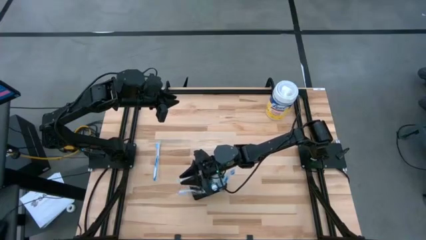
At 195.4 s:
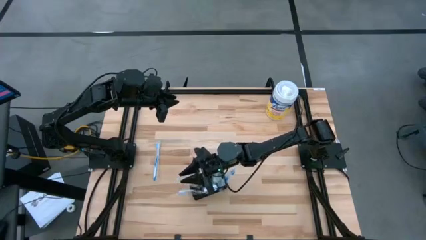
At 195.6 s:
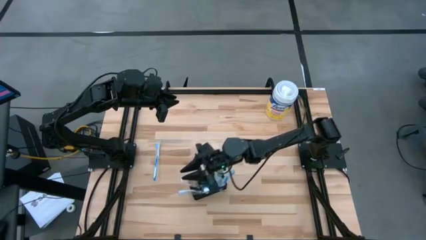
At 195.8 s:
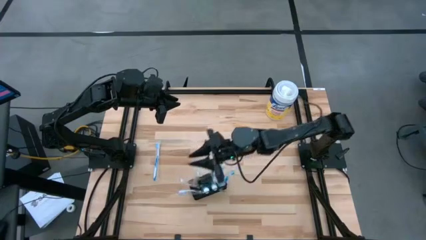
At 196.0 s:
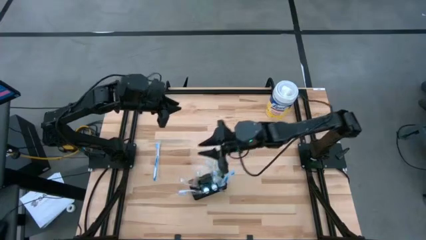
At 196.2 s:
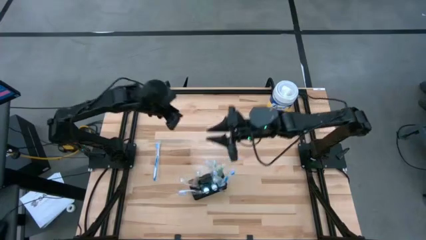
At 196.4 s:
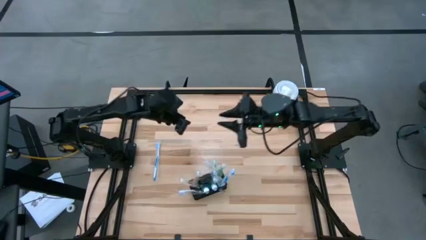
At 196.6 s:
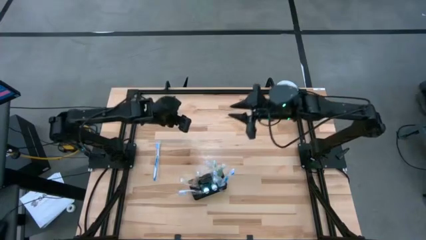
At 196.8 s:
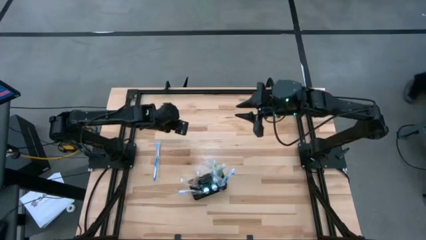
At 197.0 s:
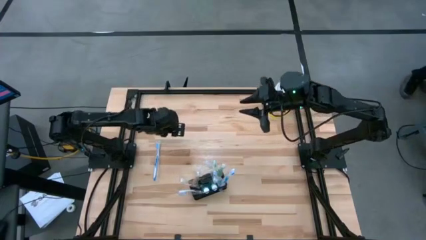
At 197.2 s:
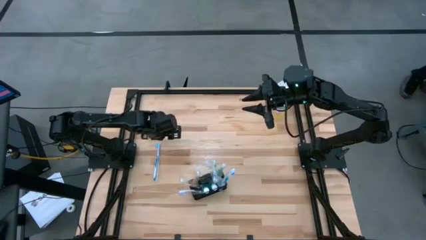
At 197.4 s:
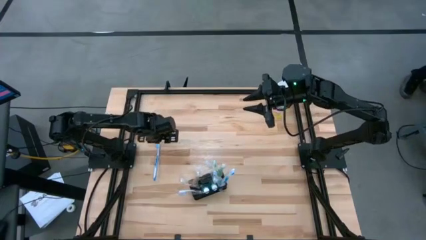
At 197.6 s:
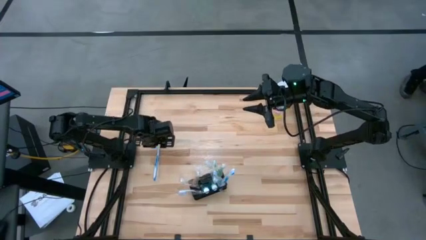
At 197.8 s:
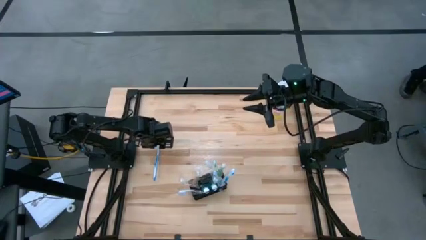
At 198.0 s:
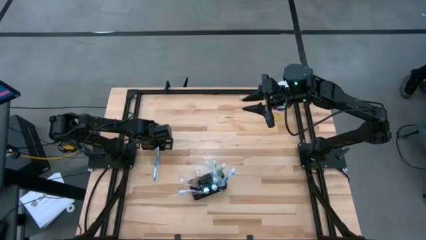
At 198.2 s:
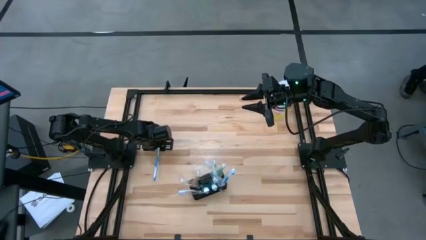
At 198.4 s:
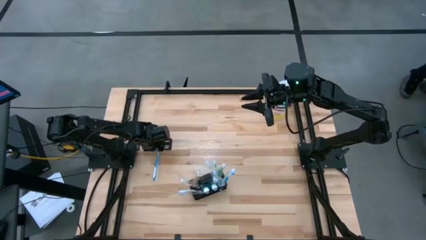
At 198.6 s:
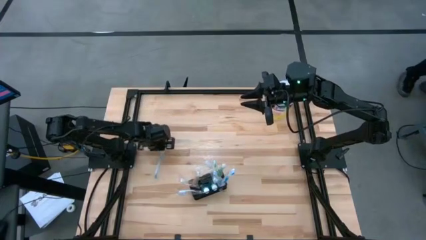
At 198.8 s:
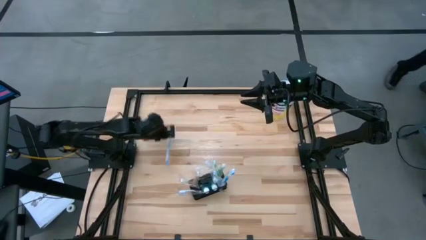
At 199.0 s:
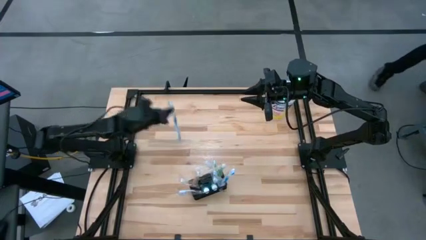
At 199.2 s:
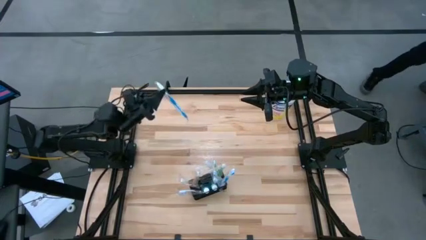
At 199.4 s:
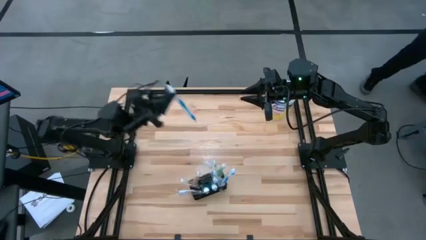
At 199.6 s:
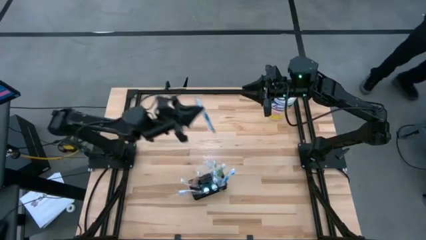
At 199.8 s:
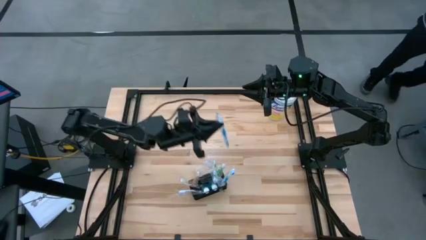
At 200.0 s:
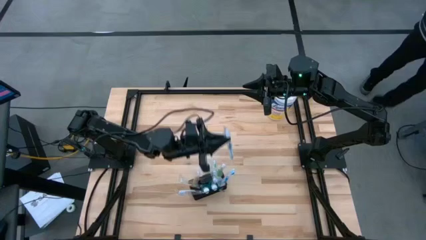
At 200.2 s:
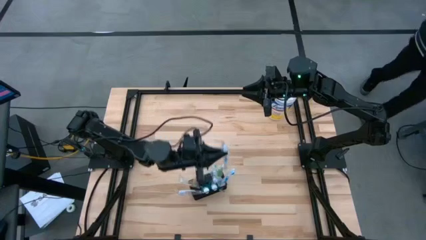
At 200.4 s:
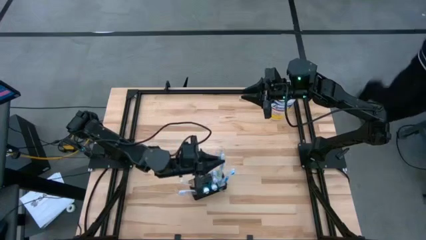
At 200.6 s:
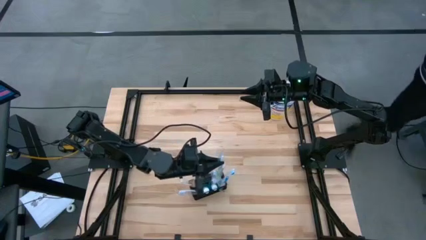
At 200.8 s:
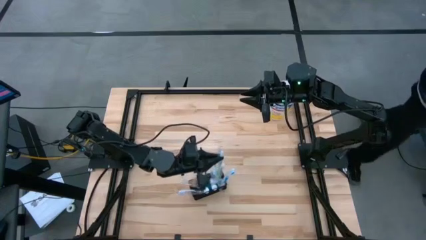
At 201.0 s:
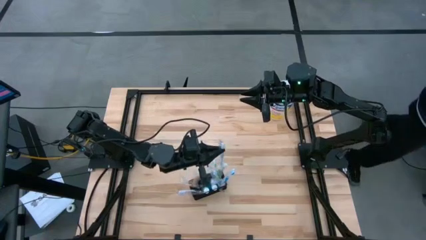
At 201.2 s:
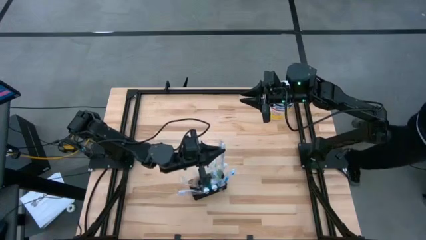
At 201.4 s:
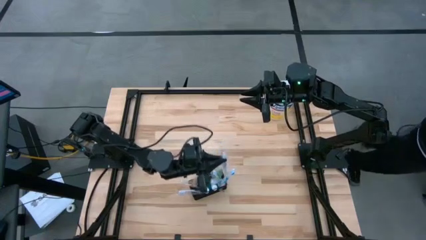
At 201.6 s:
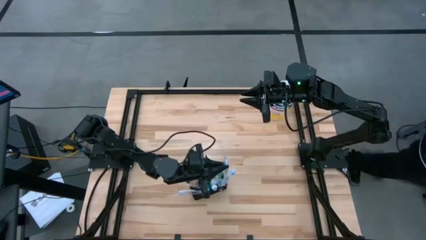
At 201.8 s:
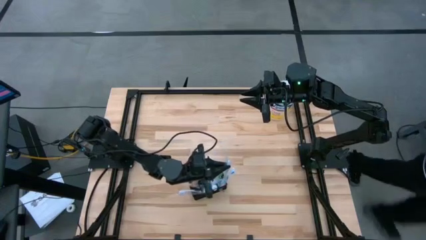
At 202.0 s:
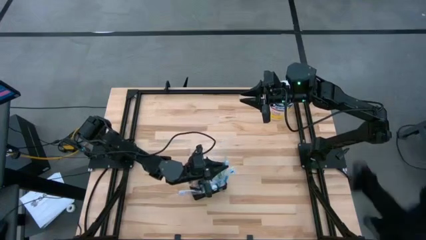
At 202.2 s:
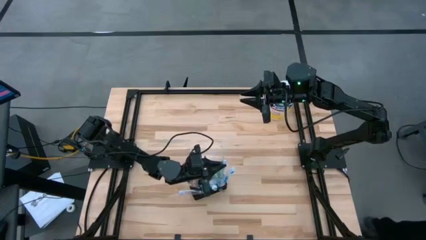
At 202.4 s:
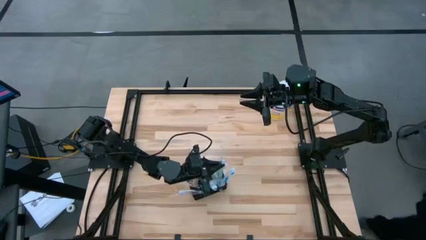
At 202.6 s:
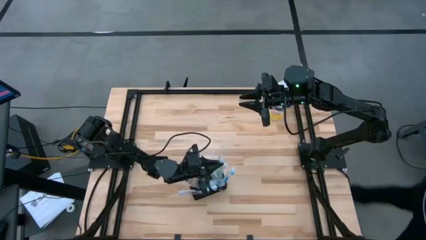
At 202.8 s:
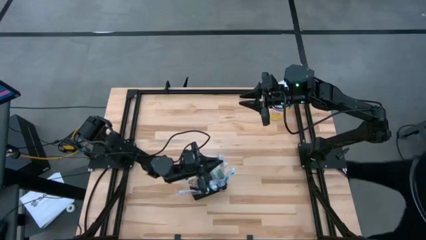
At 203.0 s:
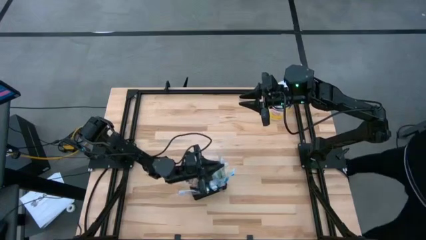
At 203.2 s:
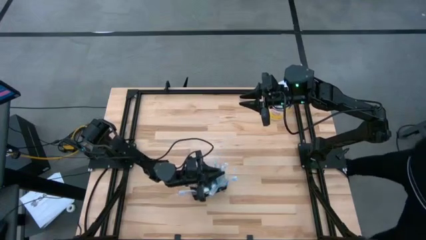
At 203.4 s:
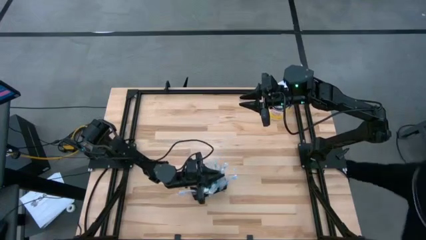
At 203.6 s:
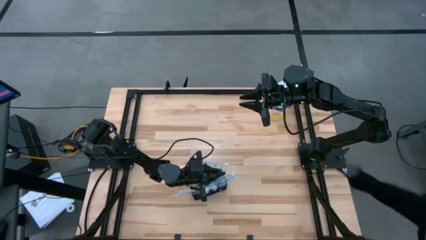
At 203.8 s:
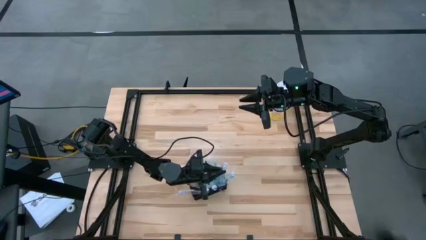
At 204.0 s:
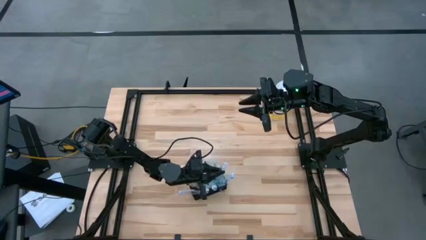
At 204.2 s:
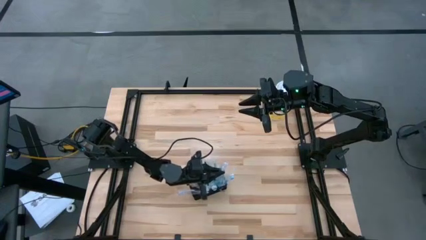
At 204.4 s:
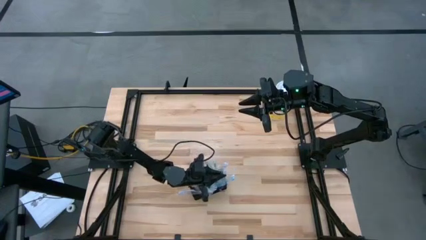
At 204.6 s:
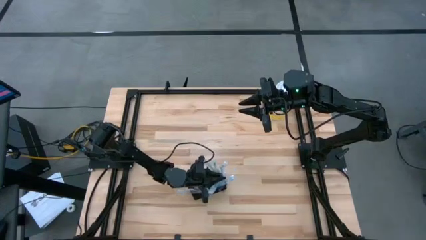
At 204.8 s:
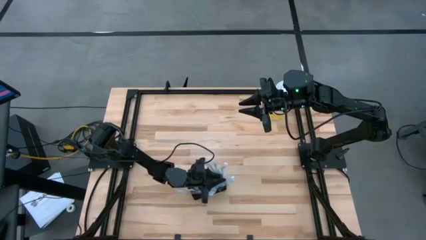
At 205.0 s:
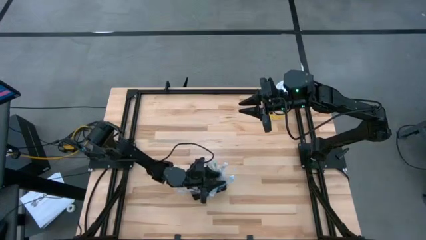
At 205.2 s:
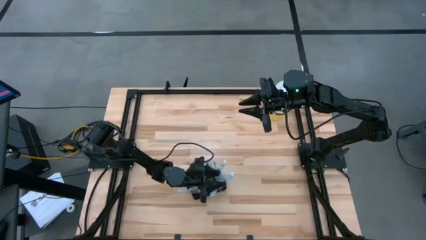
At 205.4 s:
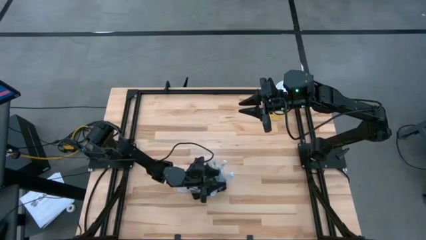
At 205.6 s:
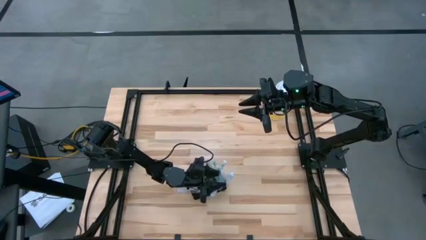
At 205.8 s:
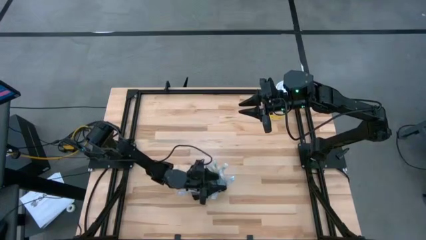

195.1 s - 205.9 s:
Task: Pick & Place toothbrushing station
Put the blue toothbrush into the mesh organizer

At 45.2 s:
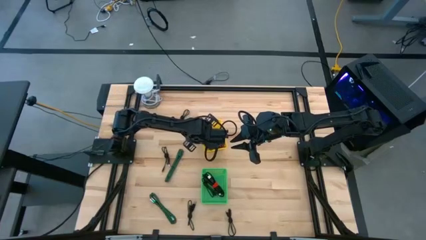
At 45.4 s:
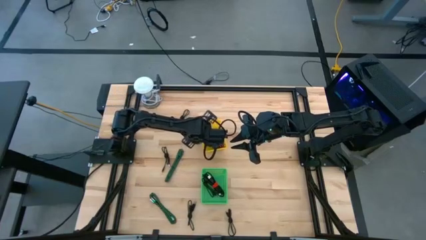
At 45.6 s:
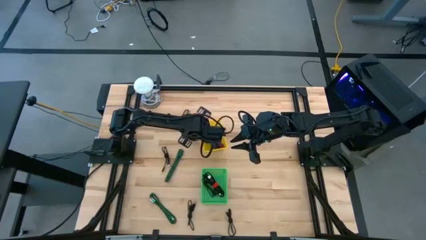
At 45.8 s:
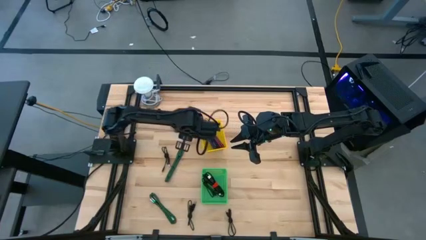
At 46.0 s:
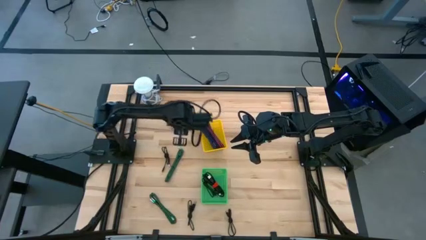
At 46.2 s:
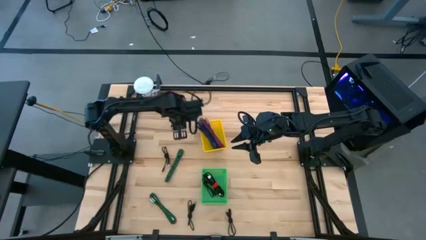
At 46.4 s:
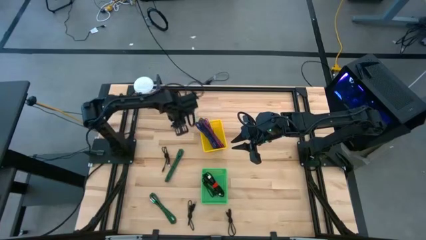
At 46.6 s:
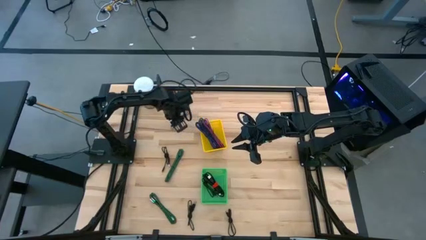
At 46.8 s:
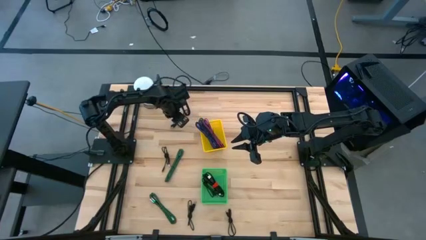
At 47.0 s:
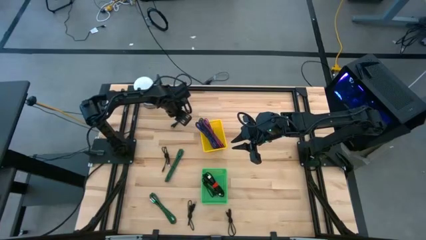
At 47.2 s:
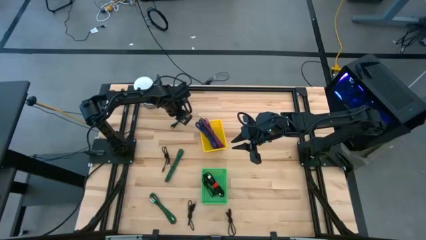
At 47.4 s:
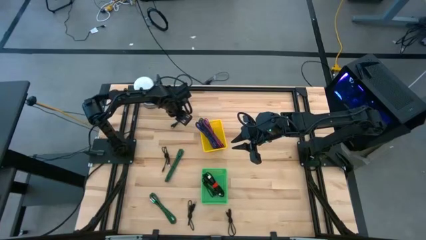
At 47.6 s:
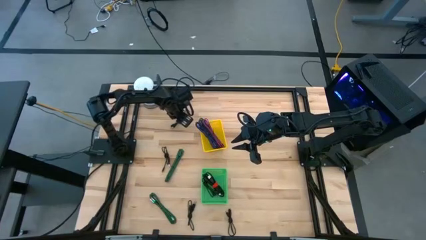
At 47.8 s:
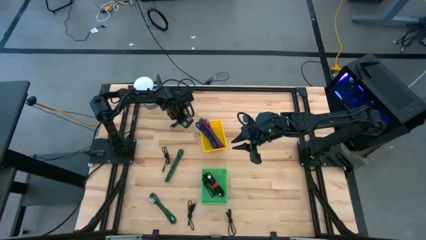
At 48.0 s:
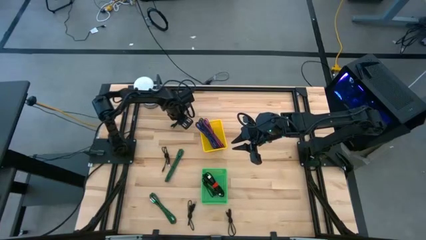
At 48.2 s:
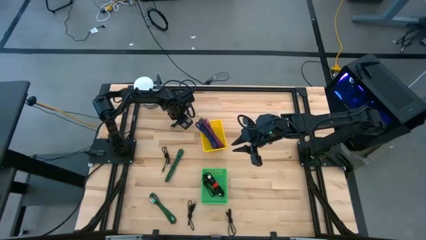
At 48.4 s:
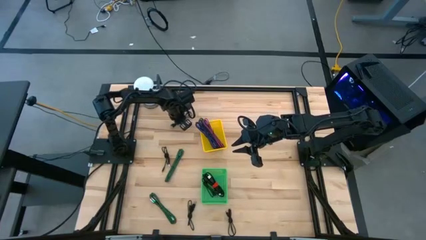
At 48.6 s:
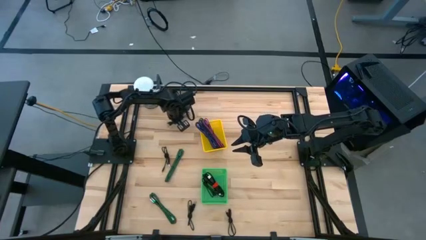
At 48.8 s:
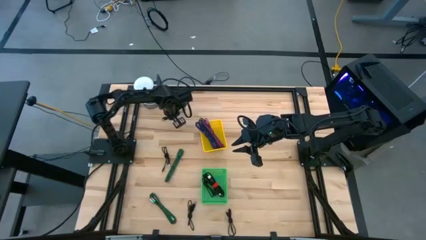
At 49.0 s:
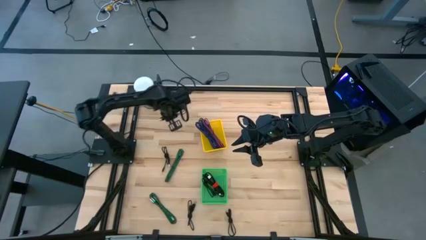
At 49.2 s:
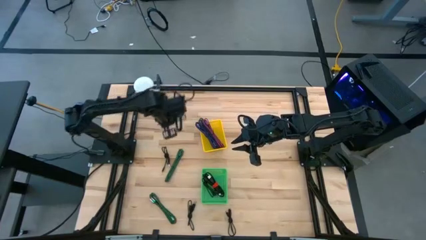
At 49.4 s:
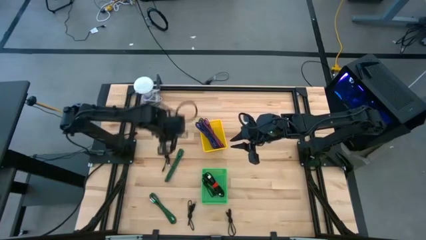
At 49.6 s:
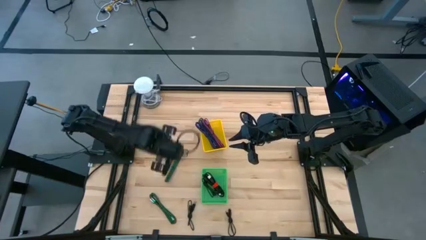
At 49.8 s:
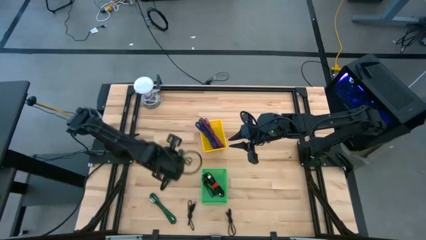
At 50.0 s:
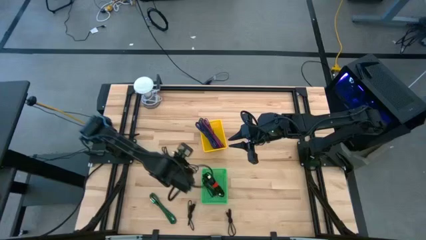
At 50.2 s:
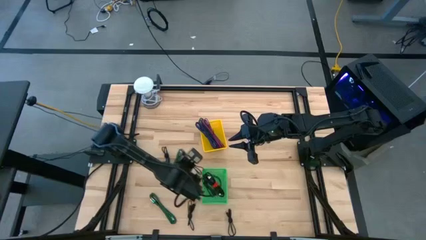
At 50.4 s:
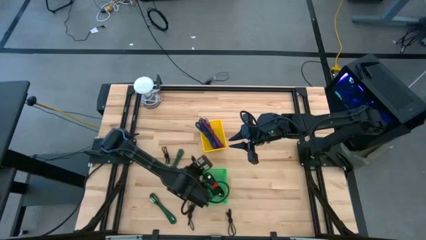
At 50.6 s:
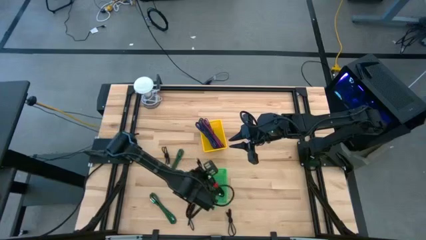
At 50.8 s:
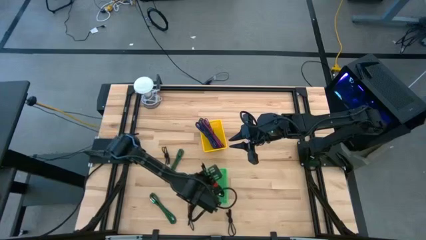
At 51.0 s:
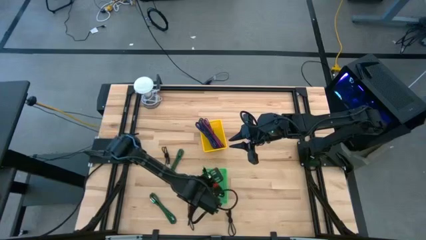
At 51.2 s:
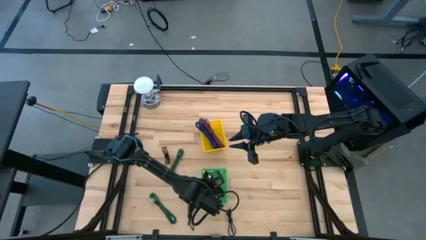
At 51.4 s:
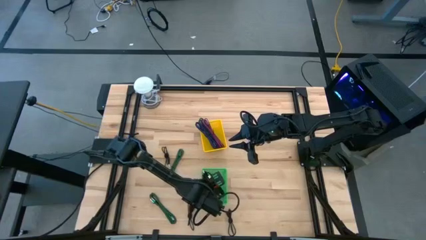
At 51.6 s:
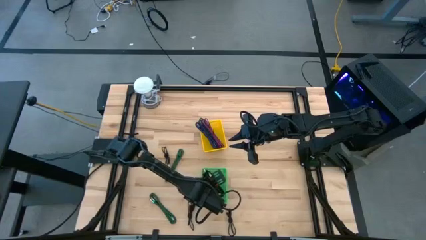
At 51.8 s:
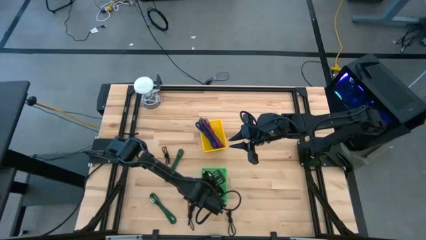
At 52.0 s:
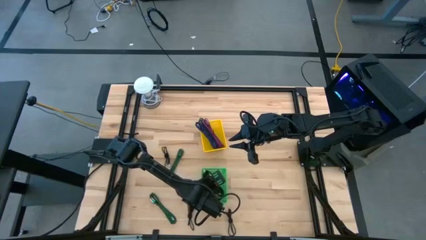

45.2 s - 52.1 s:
Task: Pick & Place USB Port
Put the black charger cable into the green bin
